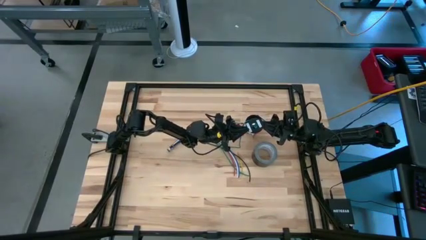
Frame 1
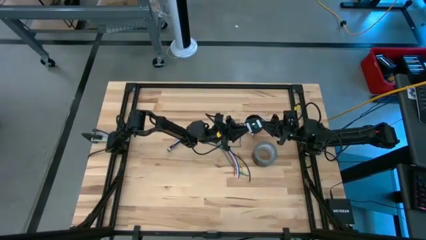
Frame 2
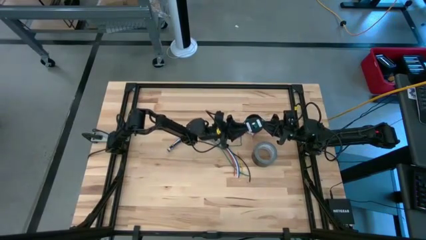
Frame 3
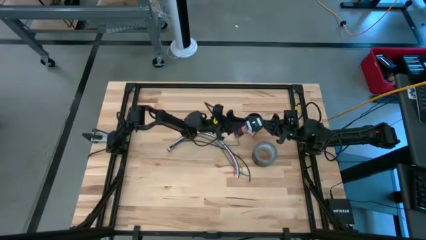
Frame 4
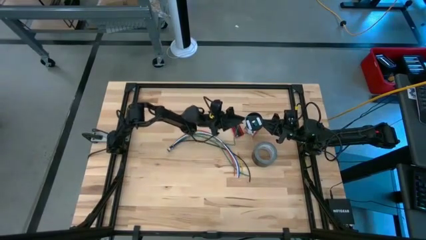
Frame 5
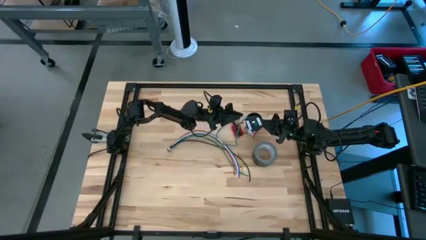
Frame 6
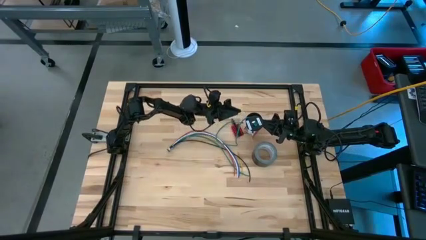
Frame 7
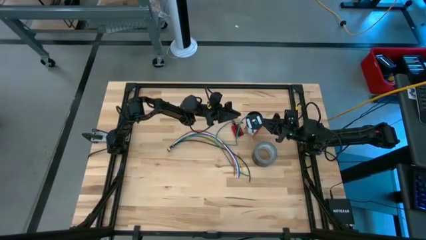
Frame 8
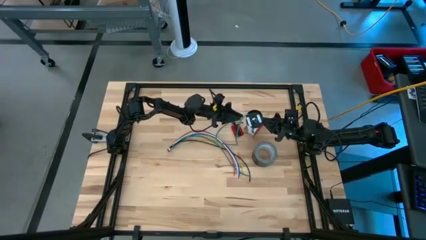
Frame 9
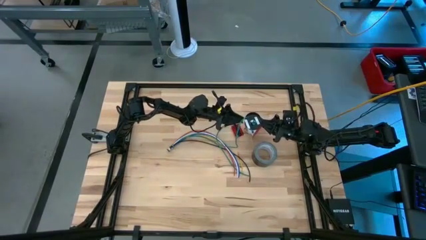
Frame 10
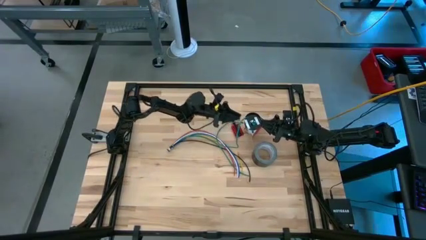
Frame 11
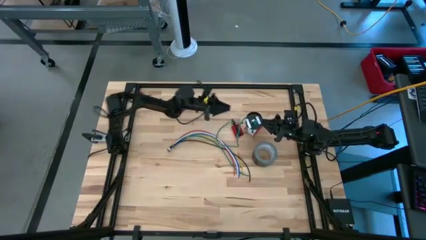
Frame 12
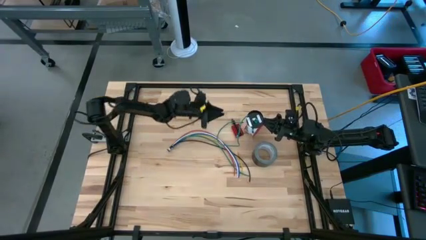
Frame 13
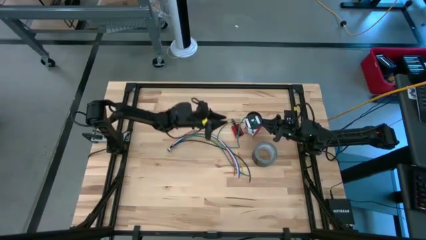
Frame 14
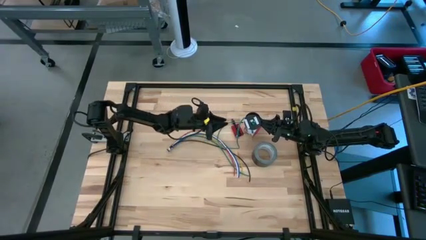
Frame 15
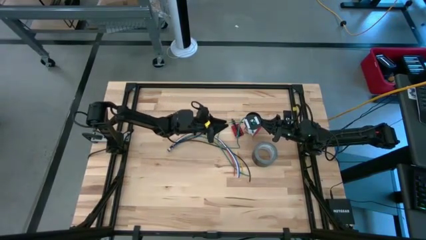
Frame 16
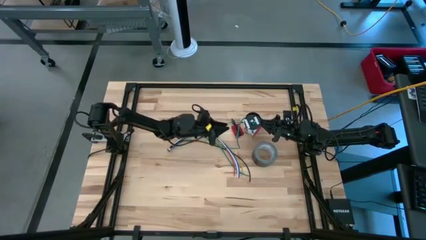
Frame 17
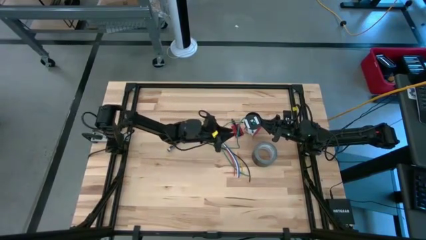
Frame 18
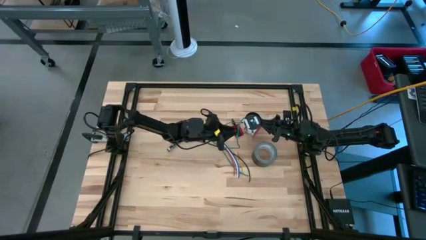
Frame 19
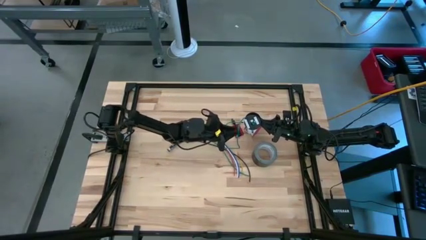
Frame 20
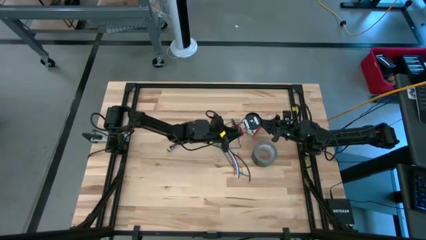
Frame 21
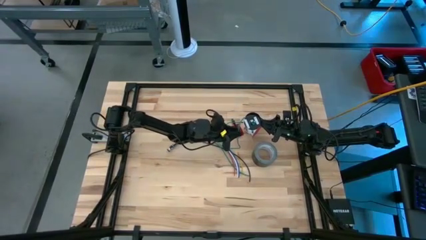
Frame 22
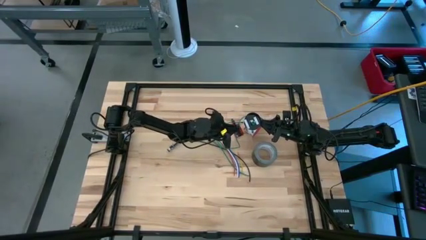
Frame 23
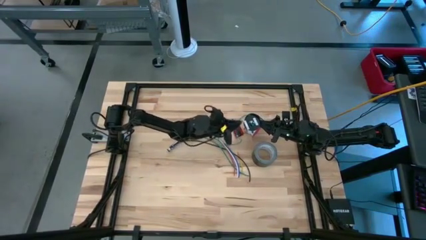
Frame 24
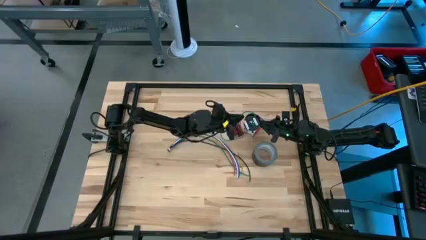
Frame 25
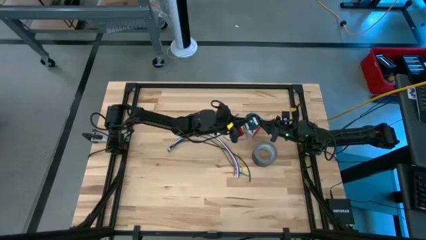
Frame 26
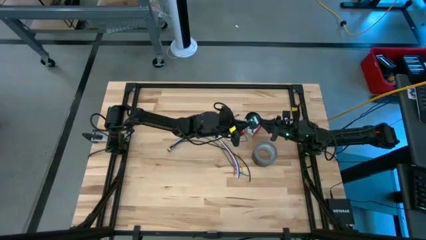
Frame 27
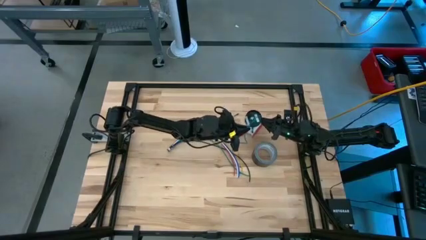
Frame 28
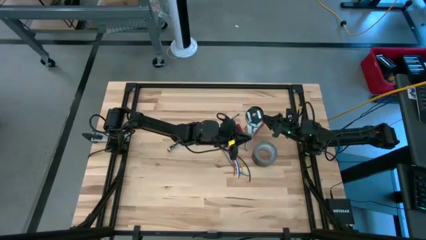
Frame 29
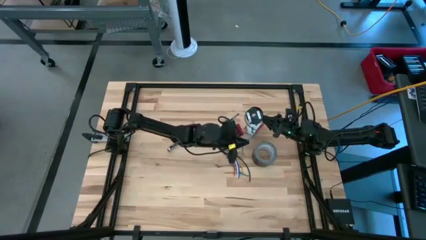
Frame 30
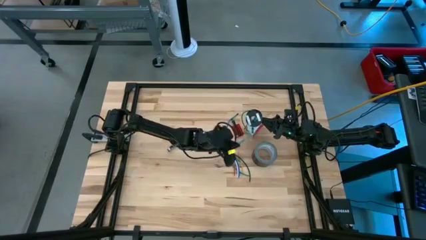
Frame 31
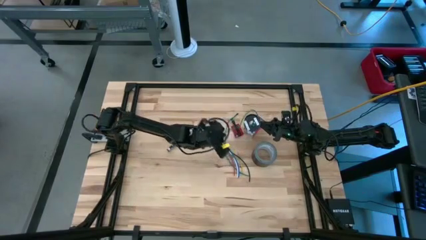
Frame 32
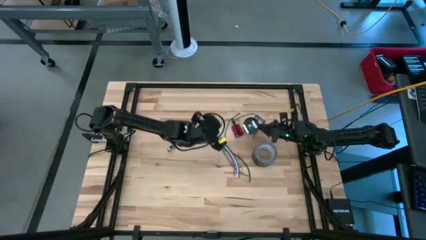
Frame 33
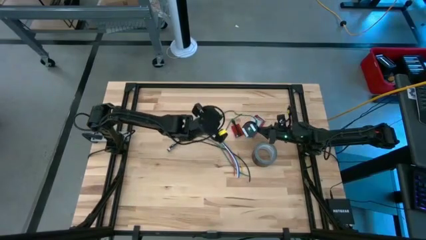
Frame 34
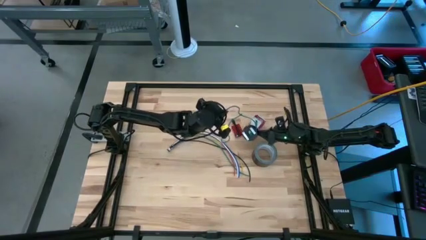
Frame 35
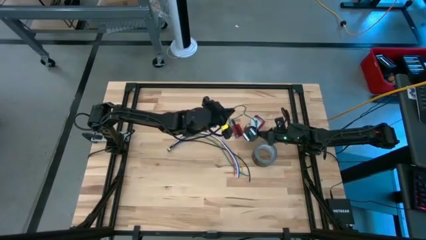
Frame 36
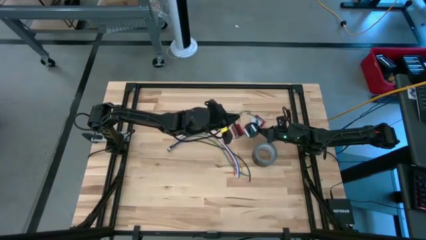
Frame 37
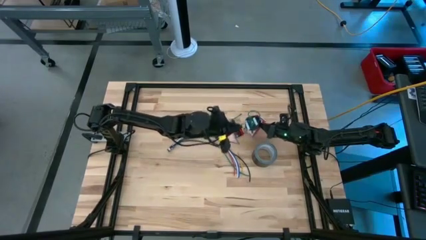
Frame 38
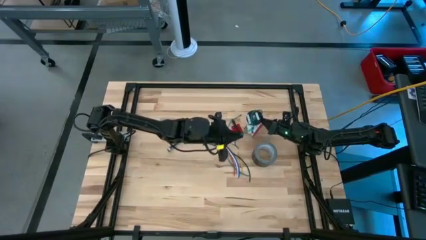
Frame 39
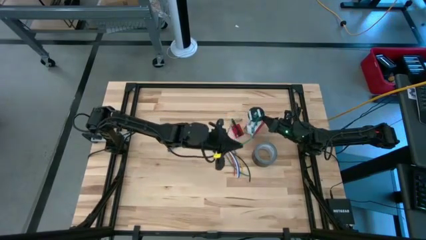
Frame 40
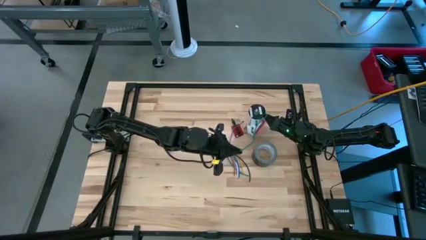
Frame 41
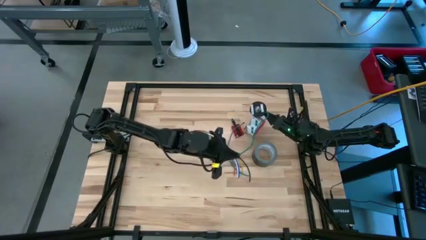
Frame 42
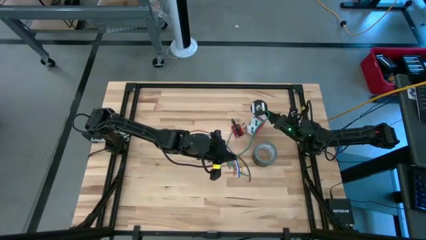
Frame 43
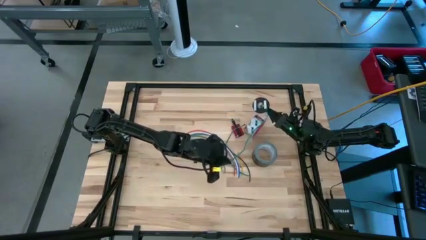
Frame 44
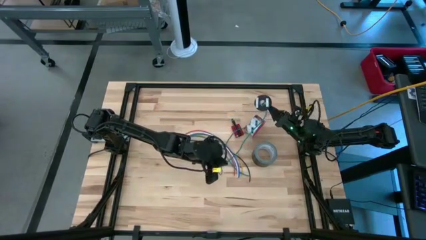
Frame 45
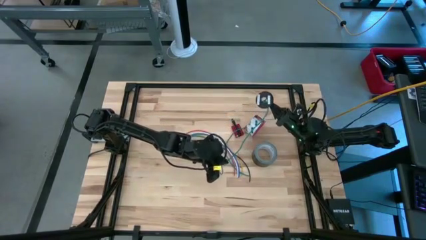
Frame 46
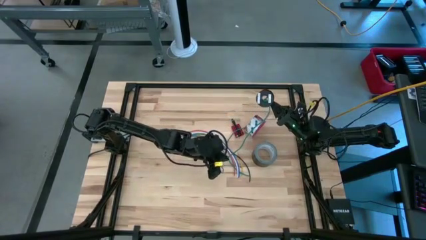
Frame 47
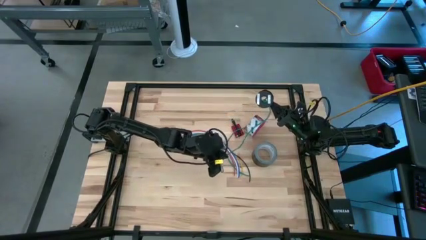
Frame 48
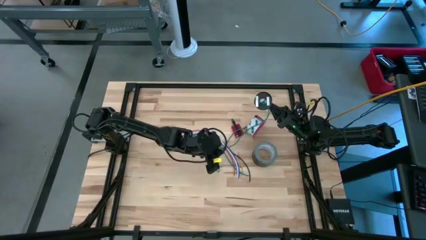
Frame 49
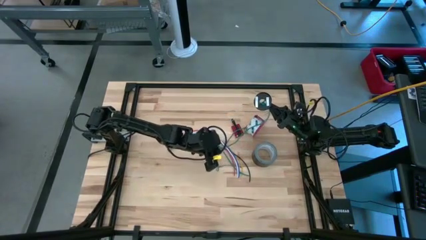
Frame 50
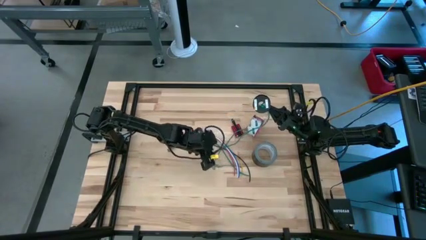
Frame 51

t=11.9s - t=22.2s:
Task: Coil cords
Uncoil green wire from the black spool

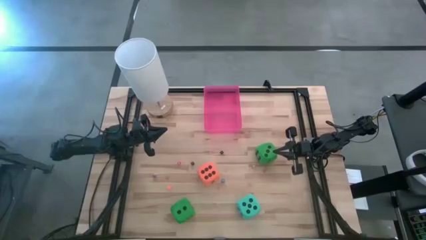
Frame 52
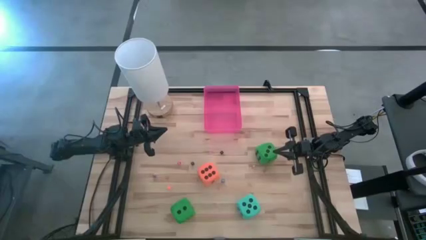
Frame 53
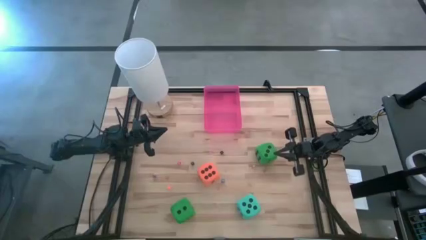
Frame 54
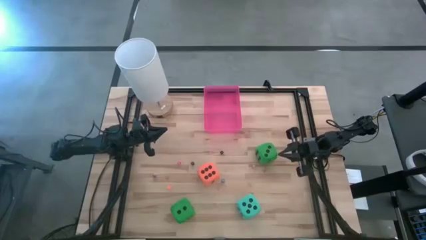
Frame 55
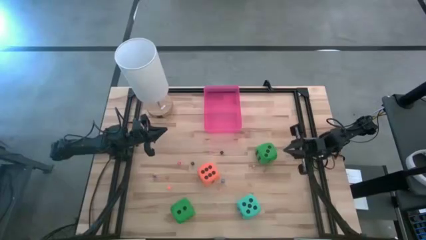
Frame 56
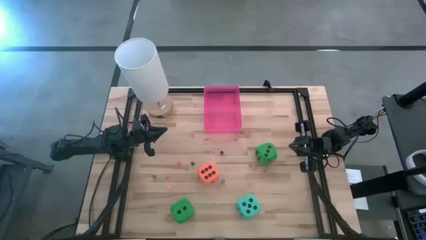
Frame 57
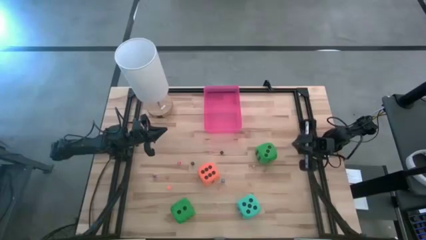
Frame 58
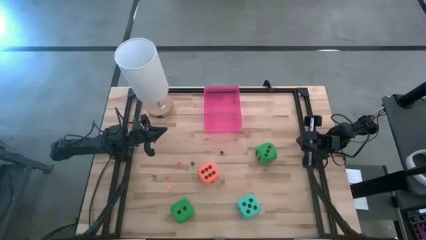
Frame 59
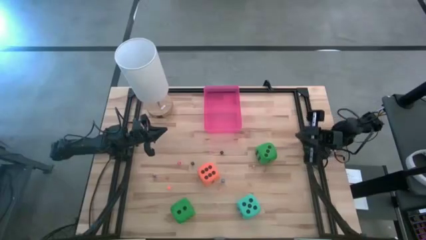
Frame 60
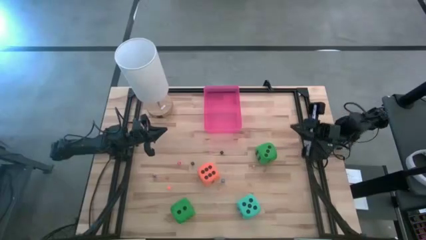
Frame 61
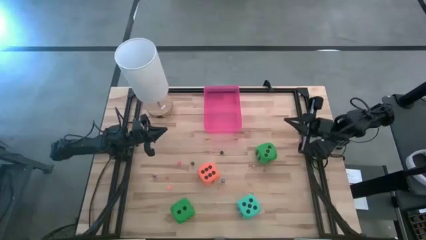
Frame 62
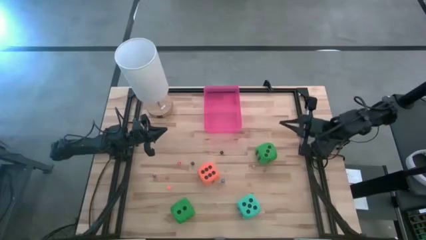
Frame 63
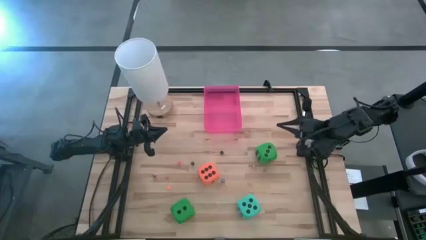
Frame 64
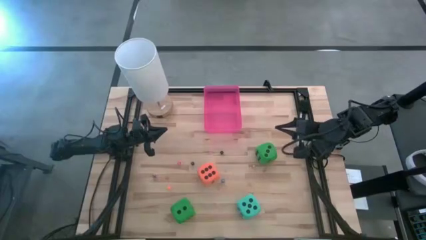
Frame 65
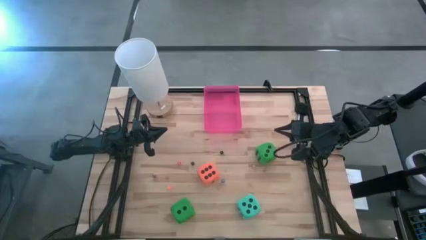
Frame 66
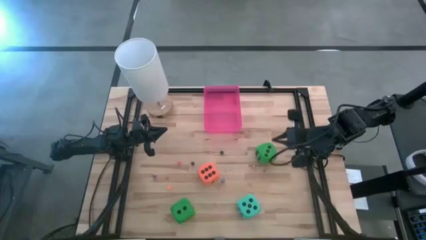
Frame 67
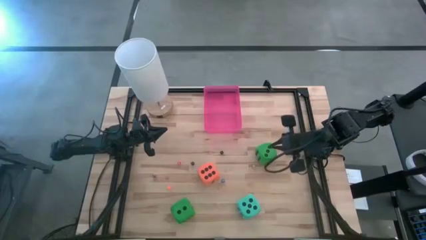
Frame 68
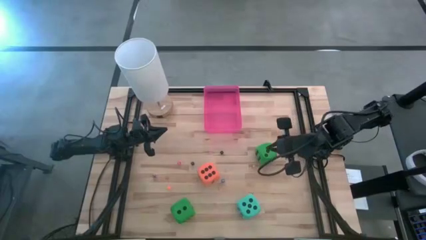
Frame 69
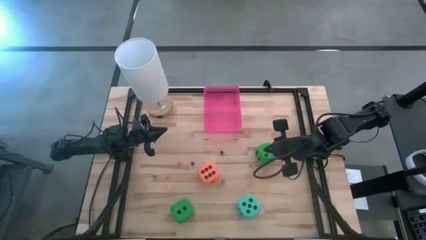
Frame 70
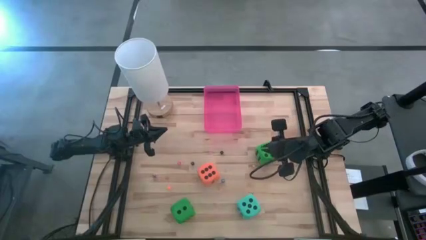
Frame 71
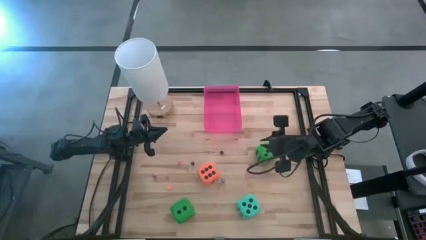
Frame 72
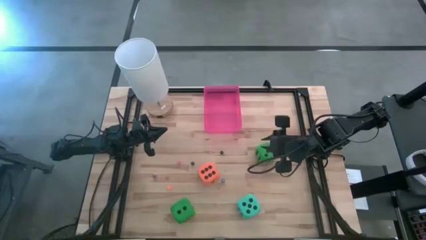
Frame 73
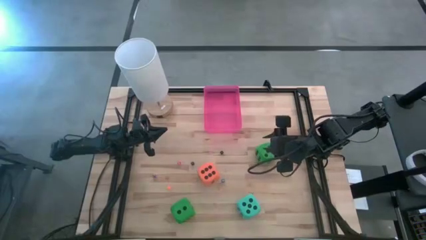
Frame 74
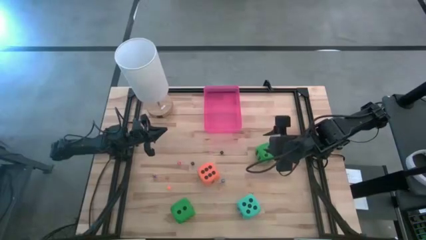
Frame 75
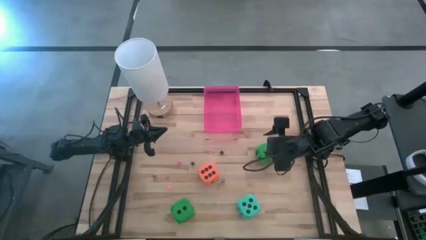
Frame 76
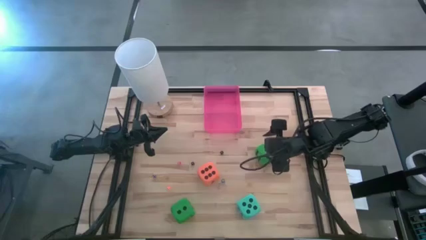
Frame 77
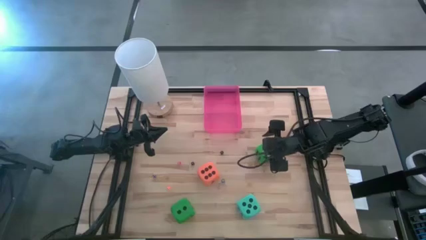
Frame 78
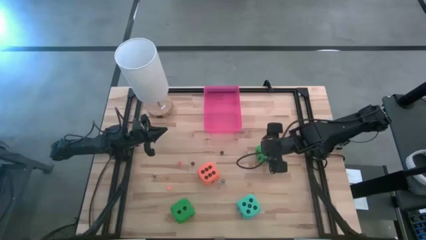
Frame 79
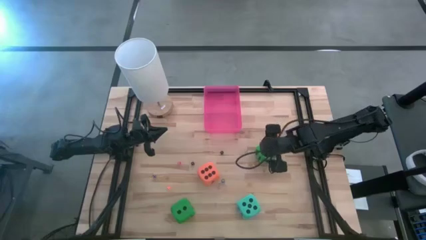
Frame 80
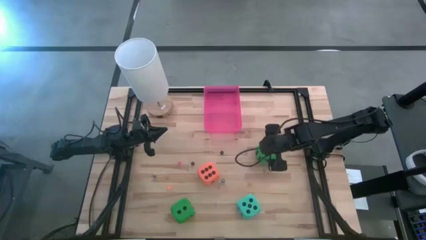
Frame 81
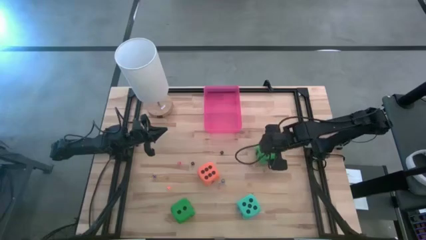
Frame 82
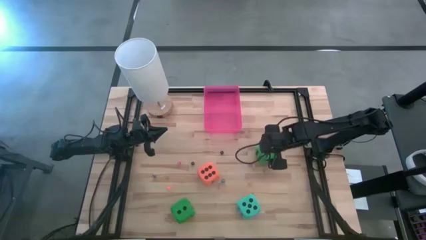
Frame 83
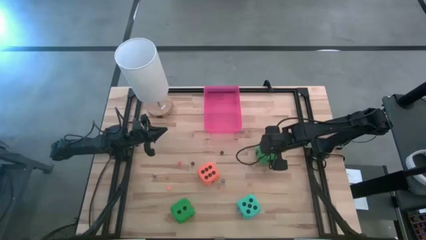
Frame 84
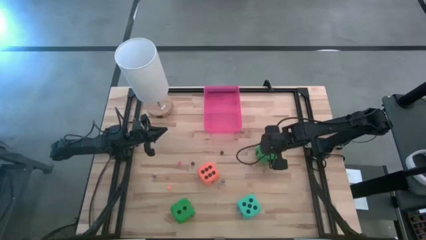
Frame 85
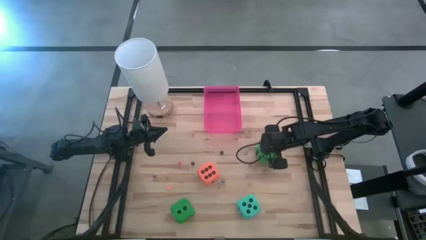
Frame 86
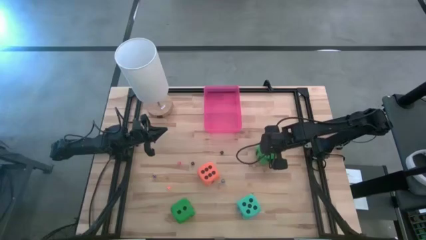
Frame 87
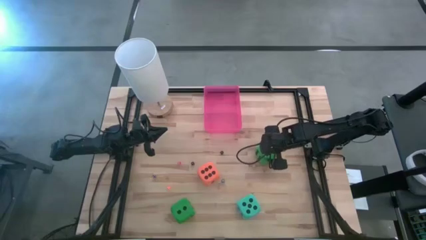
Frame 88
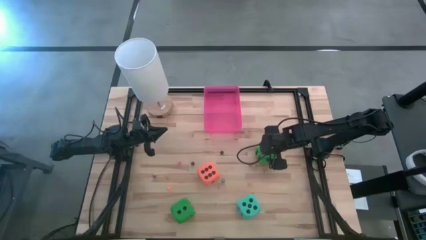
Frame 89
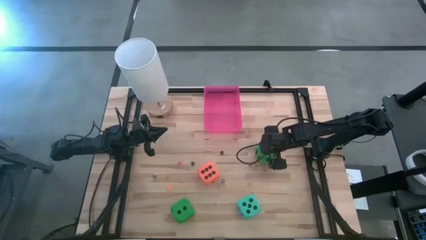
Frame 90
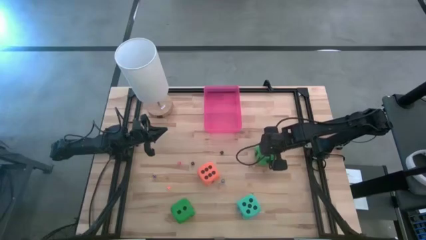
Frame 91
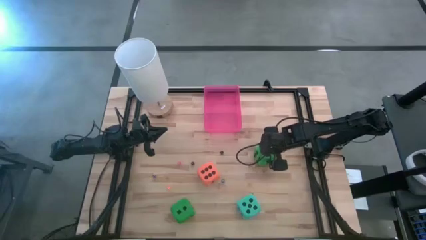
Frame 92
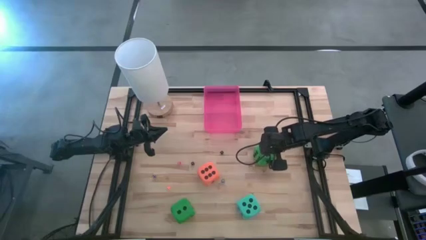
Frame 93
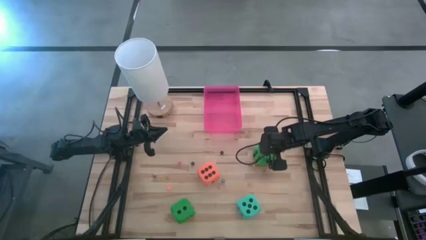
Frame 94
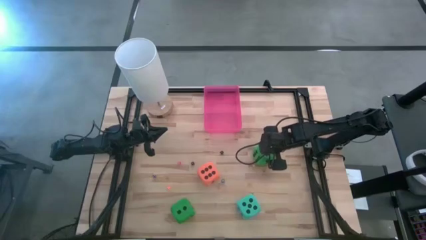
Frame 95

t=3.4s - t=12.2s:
Task: Pick & Place Dice
Put the right big green dice into the red container
